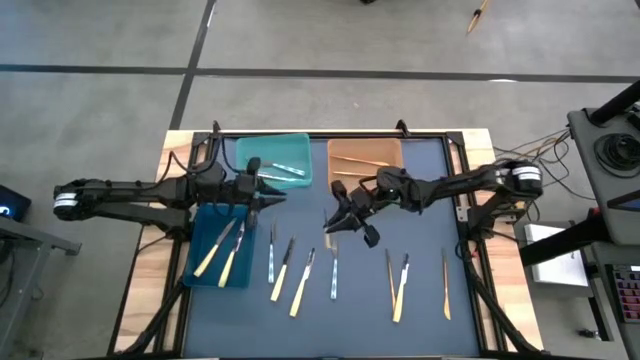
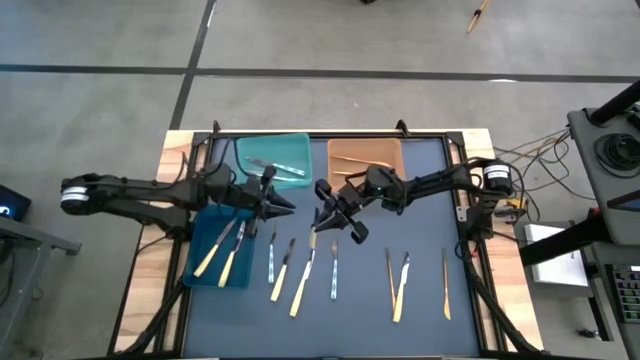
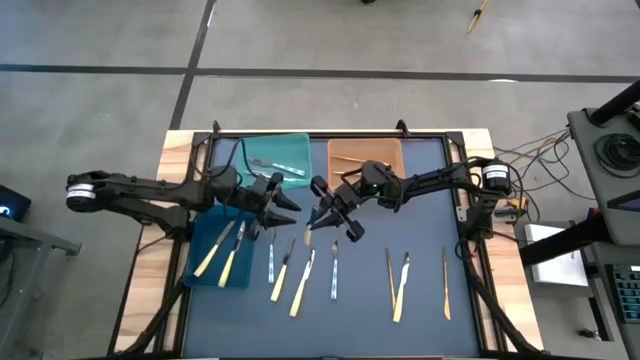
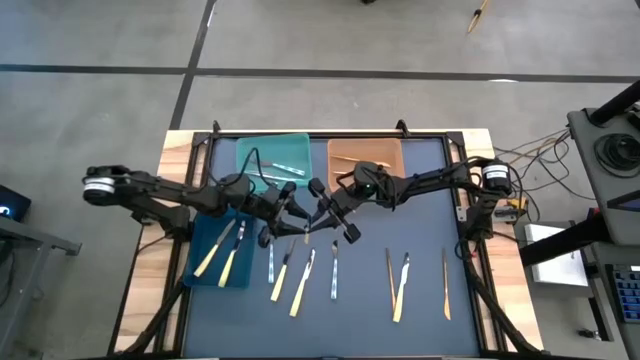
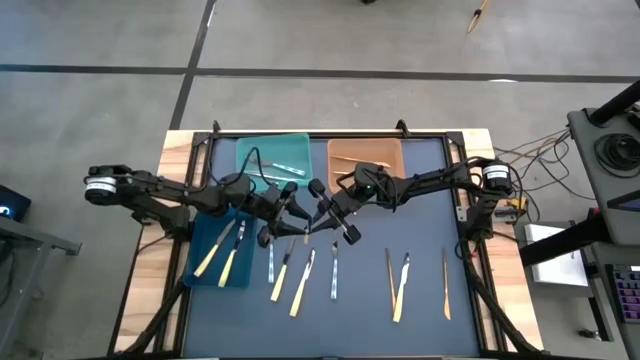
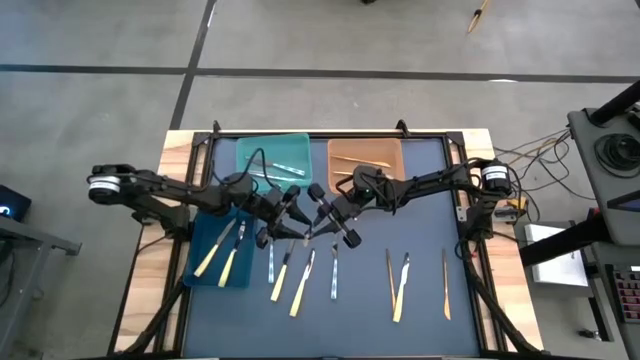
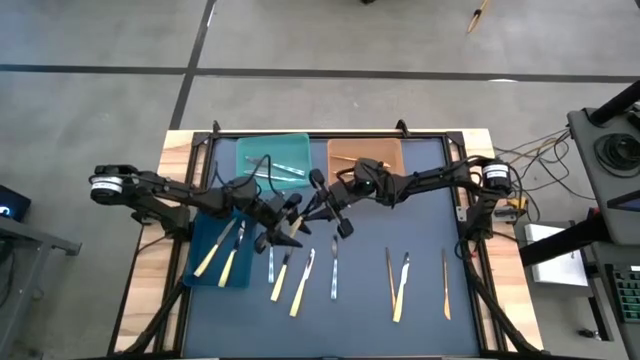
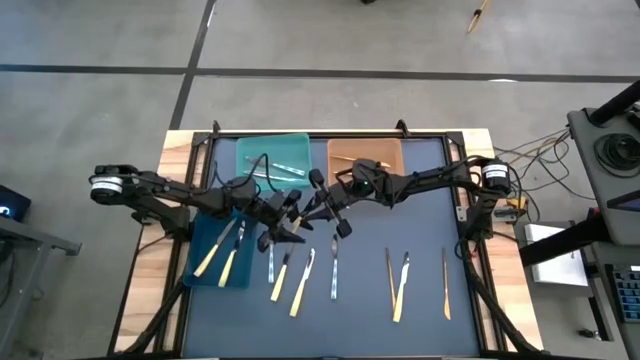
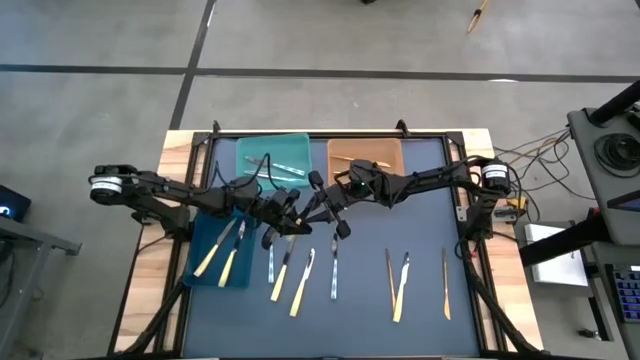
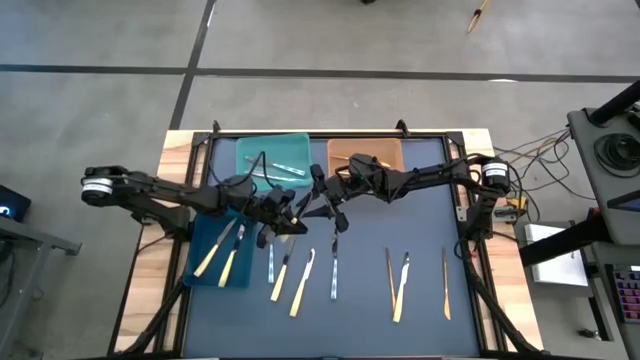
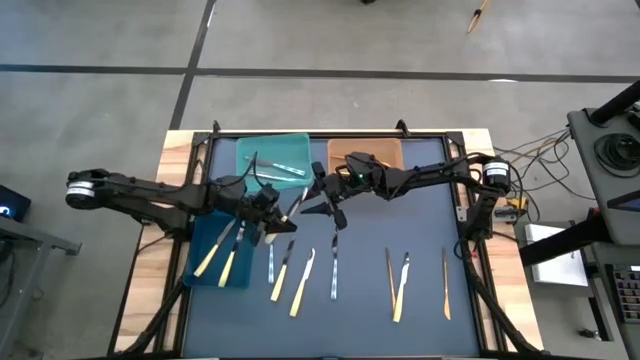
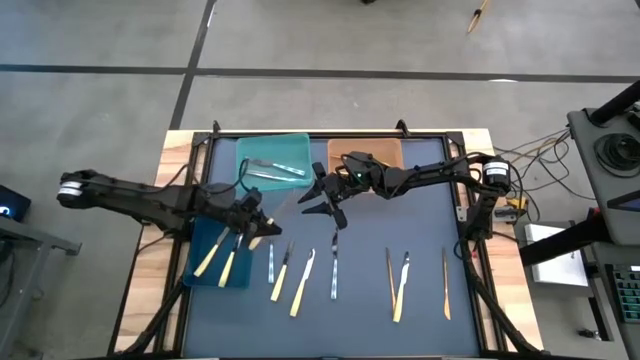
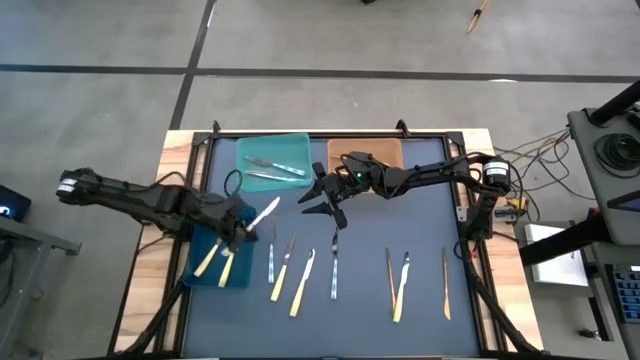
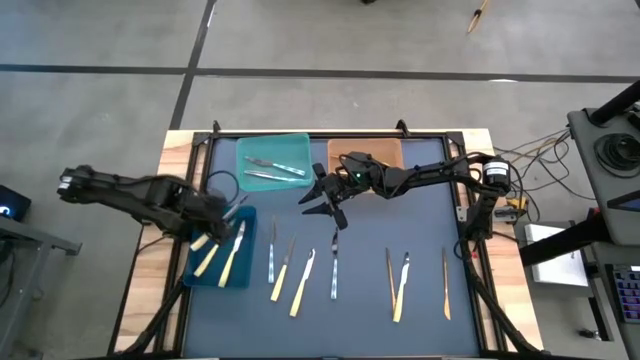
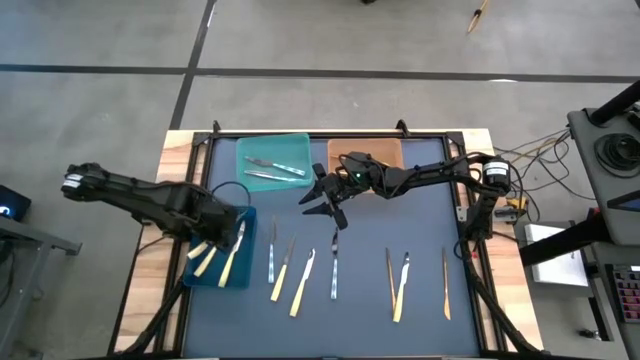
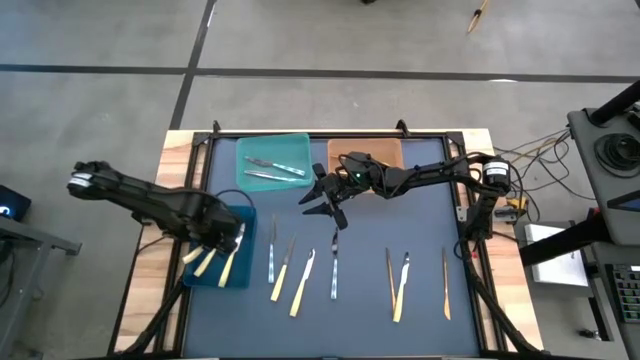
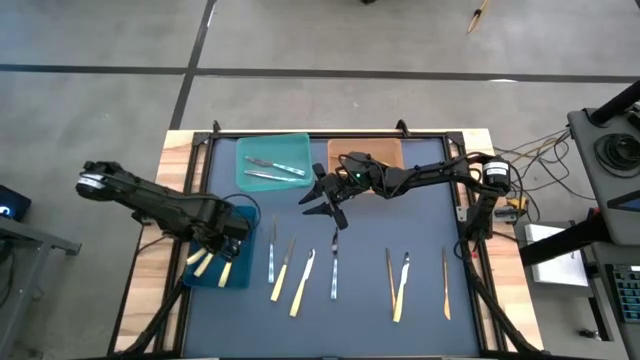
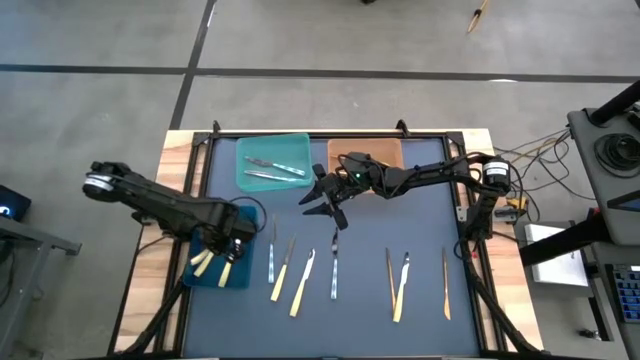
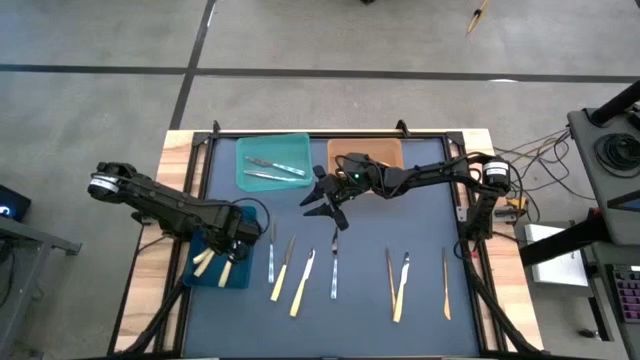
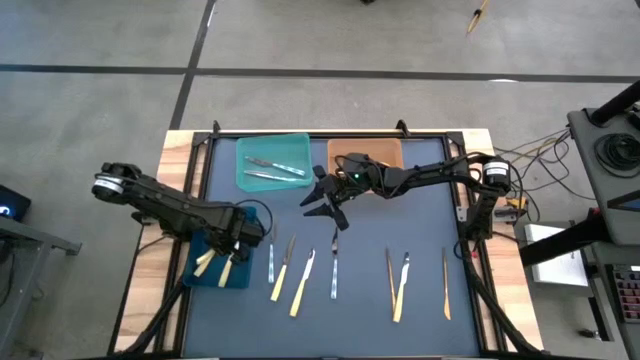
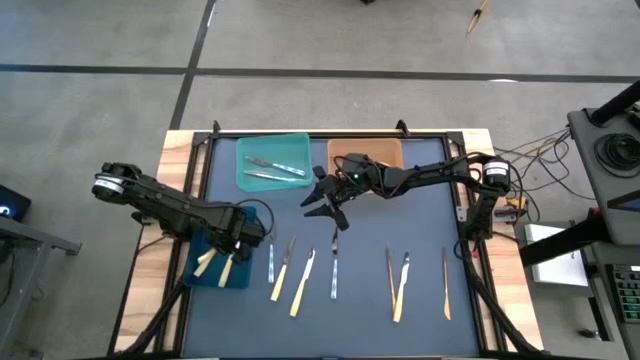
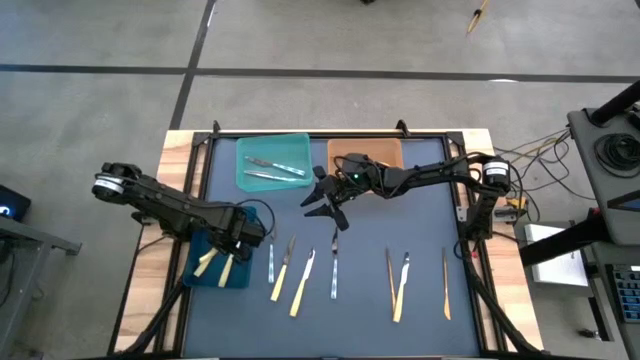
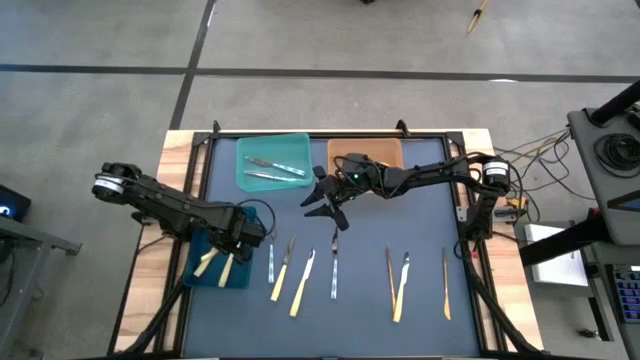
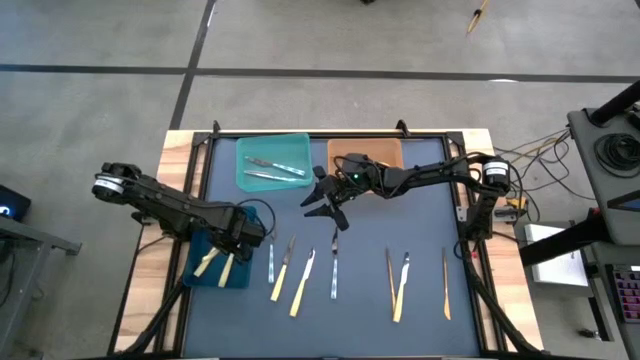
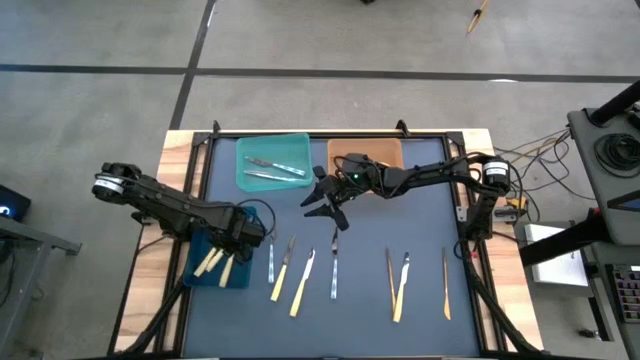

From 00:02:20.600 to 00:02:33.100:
Task: Sort silverware by color (type)
Put the light yellow knife into the blue bin

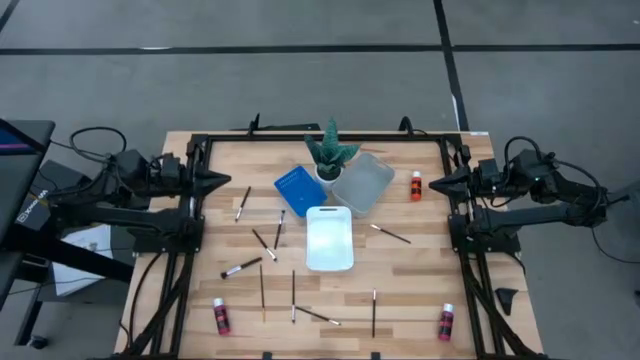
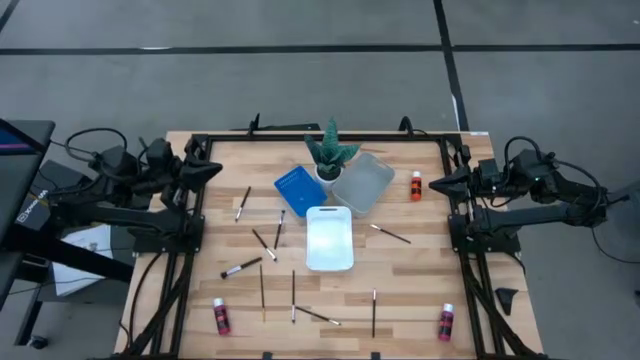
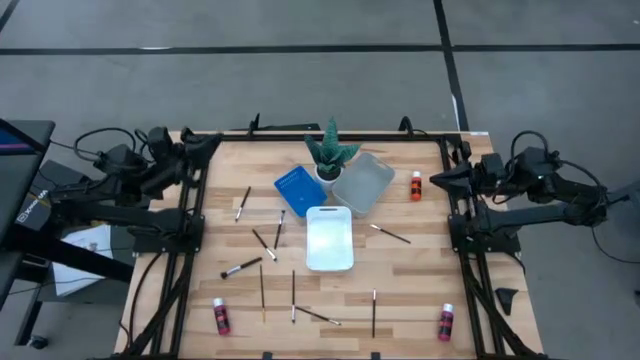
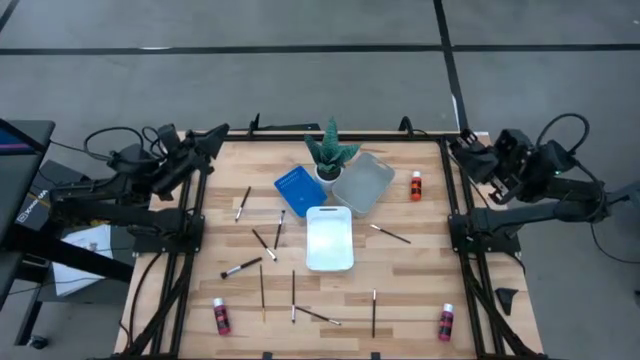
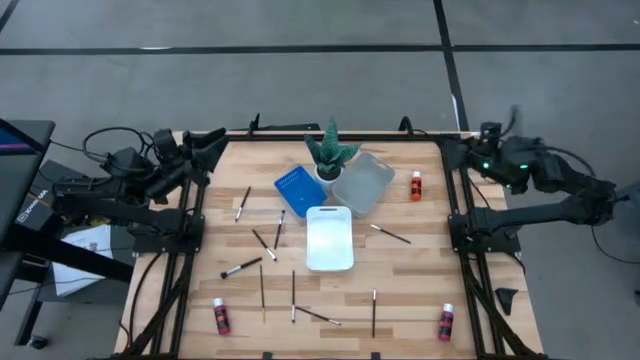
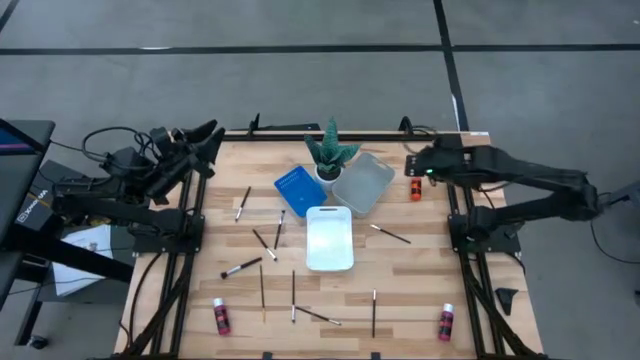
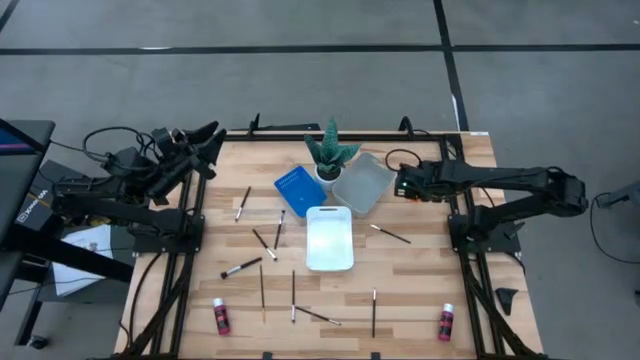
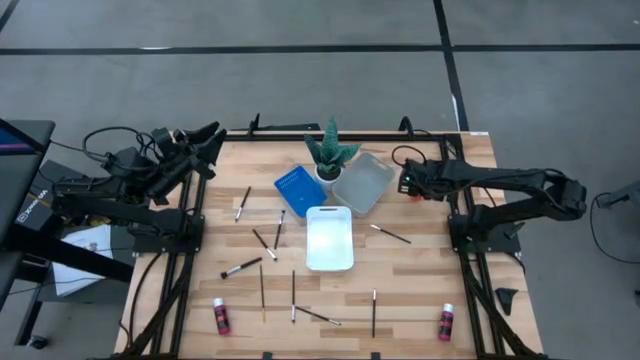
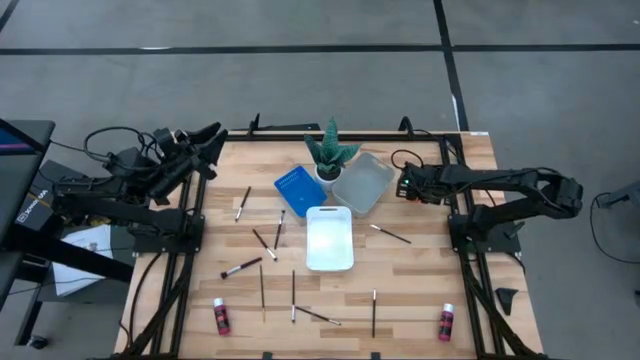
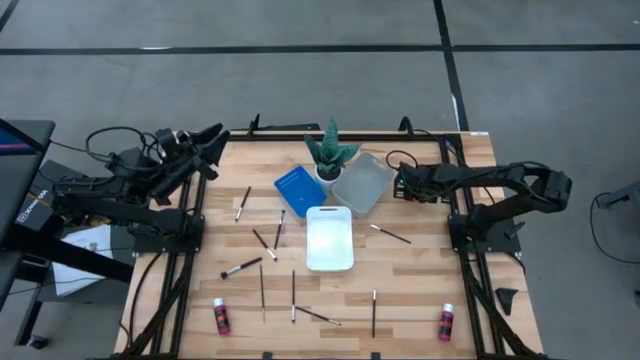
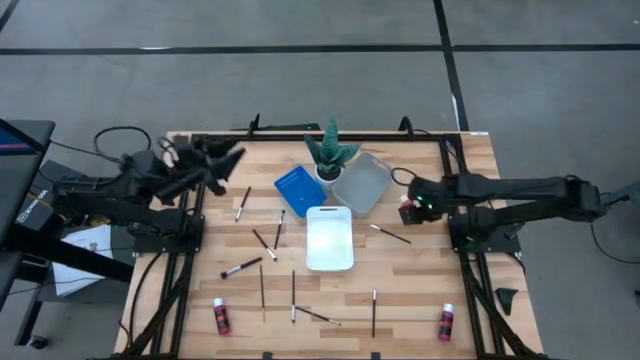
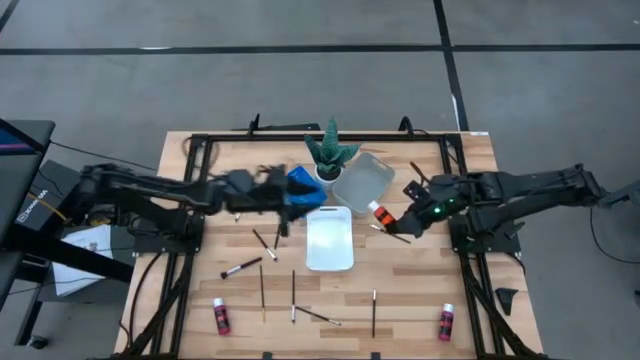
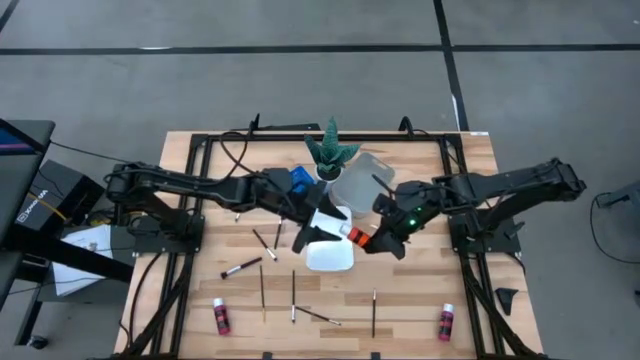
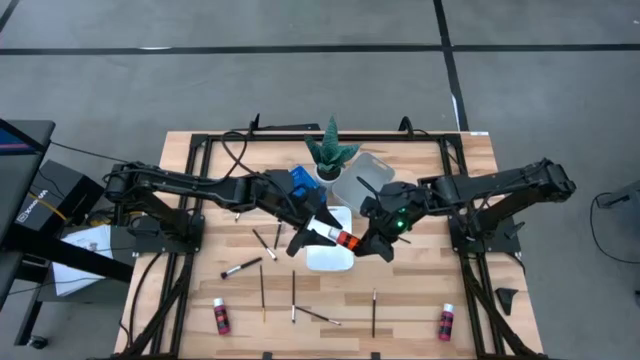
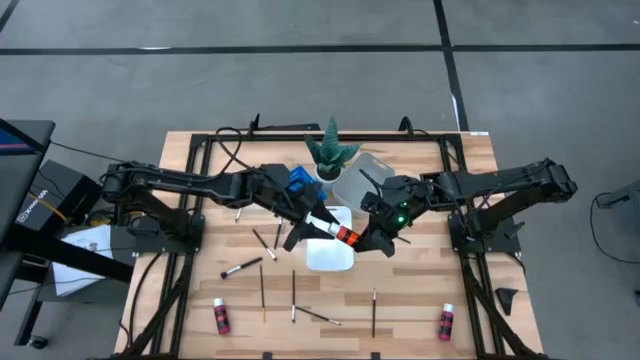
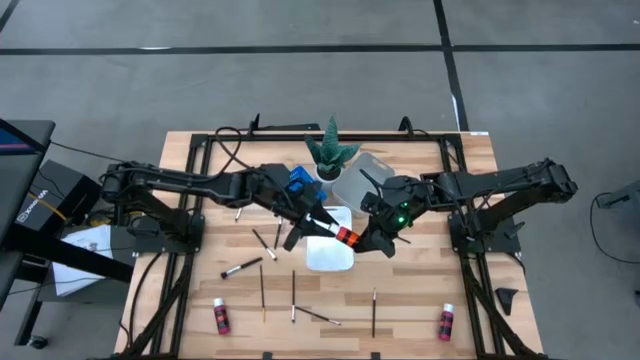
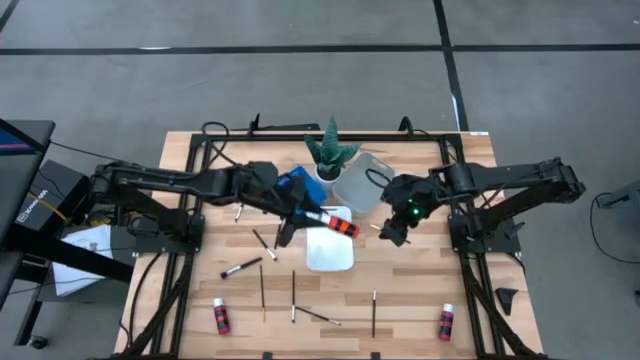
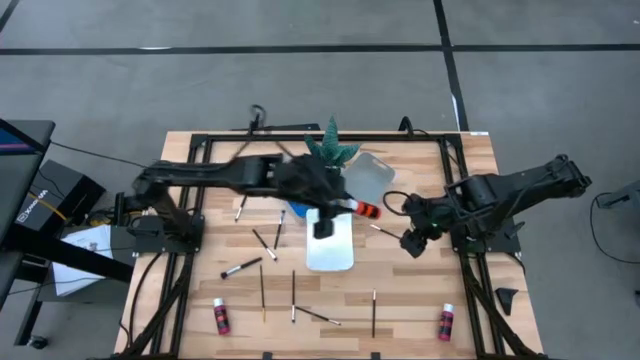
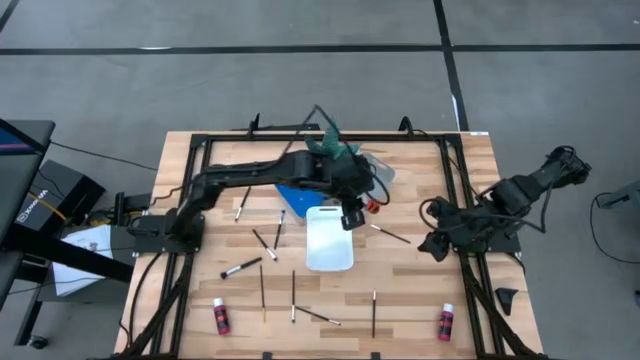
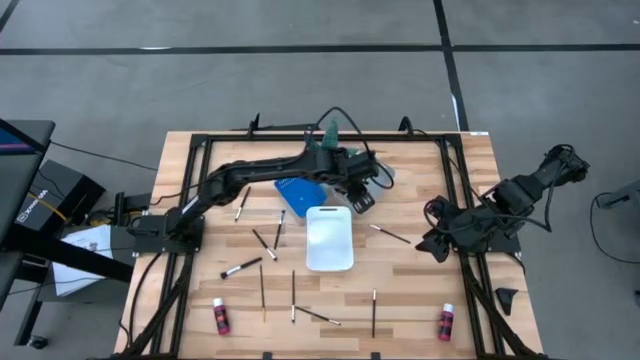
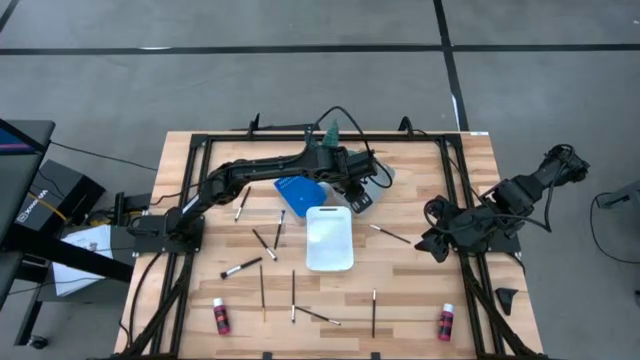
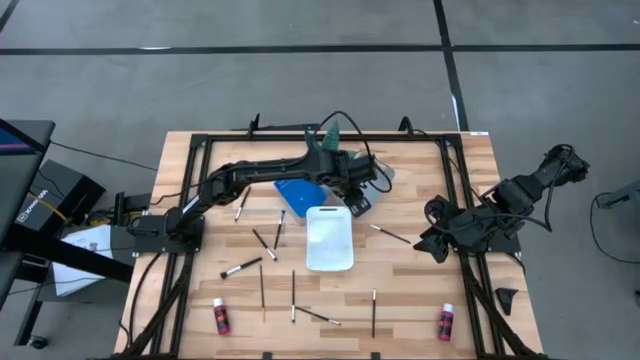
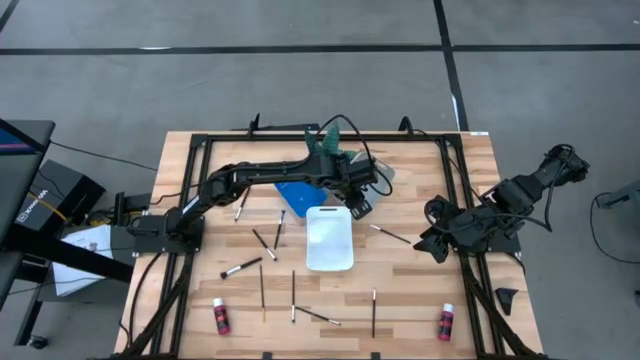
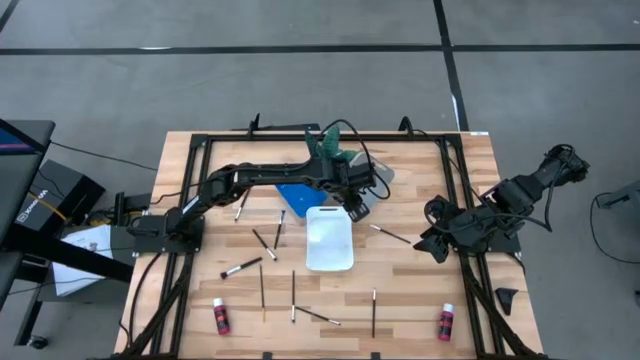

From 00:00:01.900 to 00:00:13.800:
Task: Pick & Place Paint Supplies
Put the orange paint bottle into the gray bin
